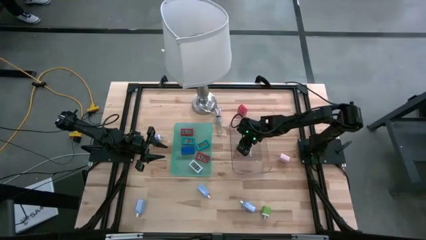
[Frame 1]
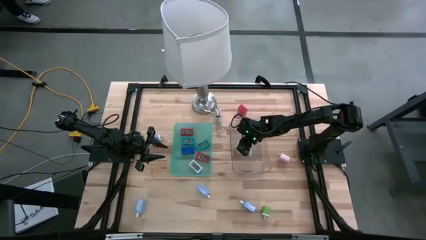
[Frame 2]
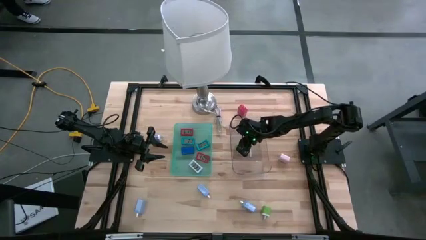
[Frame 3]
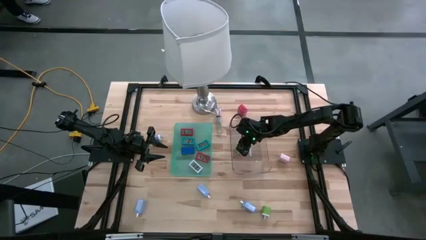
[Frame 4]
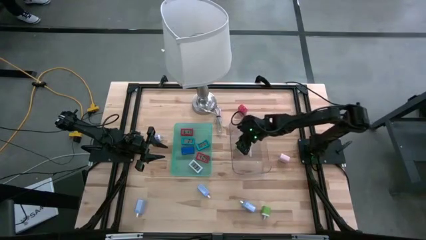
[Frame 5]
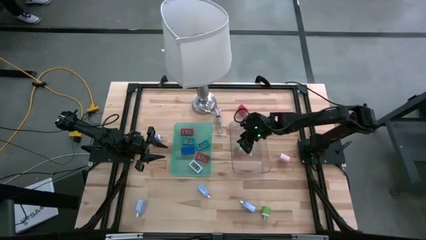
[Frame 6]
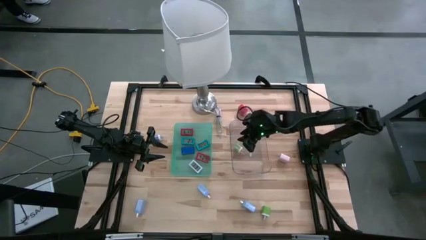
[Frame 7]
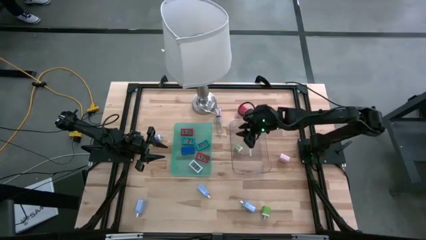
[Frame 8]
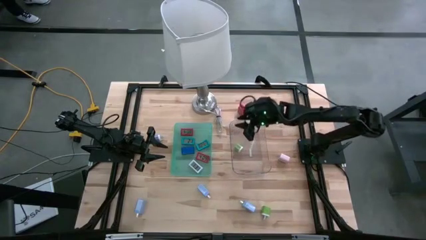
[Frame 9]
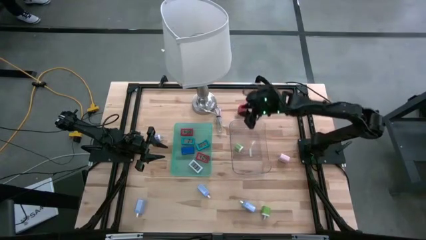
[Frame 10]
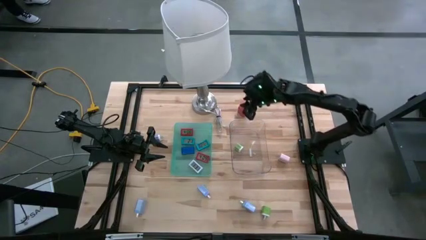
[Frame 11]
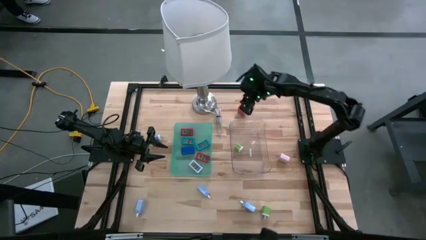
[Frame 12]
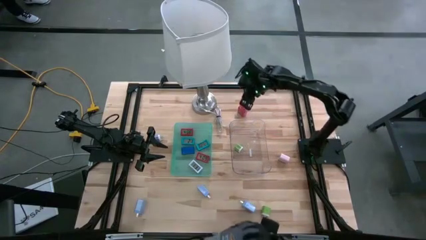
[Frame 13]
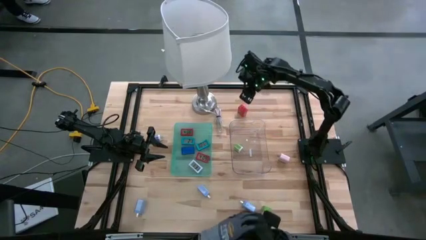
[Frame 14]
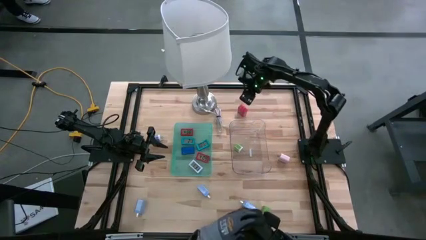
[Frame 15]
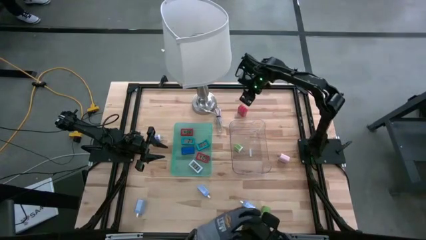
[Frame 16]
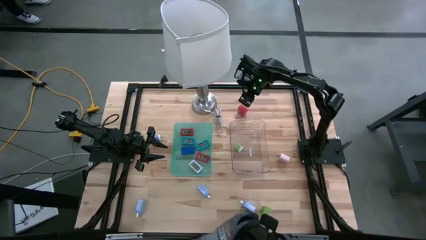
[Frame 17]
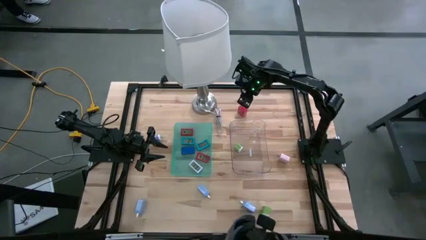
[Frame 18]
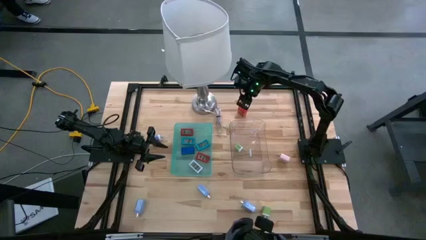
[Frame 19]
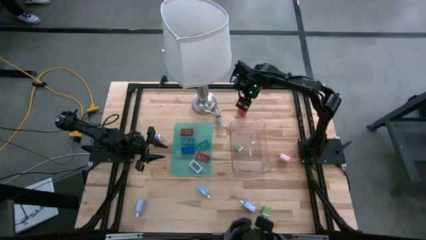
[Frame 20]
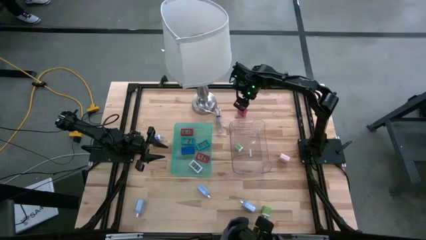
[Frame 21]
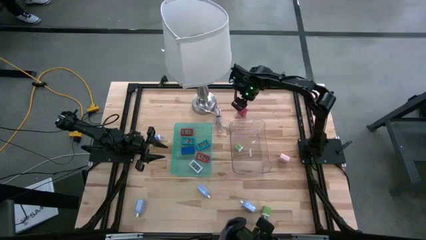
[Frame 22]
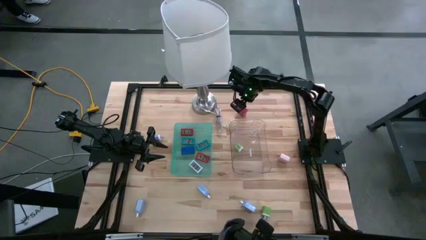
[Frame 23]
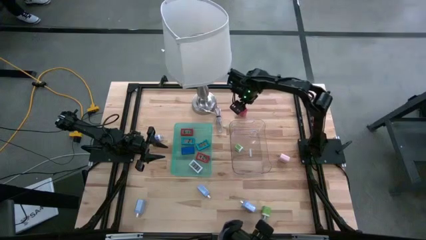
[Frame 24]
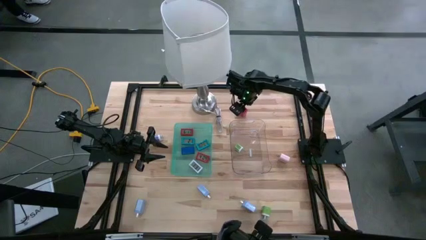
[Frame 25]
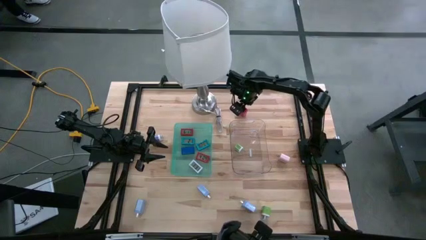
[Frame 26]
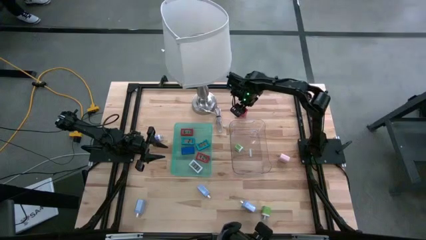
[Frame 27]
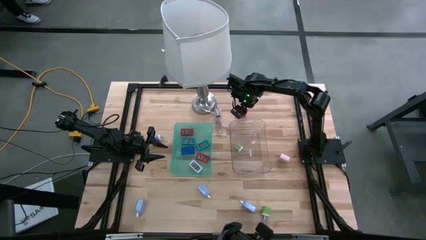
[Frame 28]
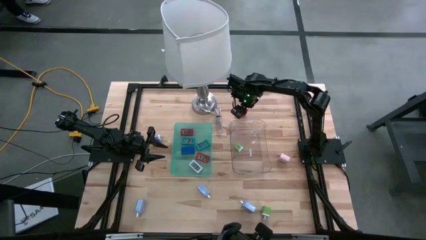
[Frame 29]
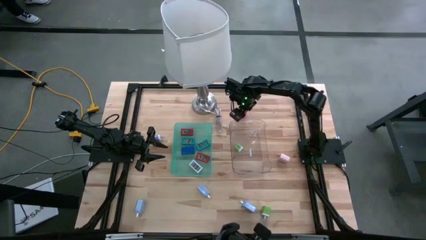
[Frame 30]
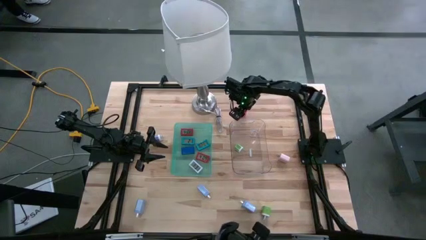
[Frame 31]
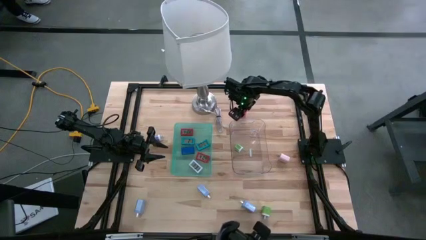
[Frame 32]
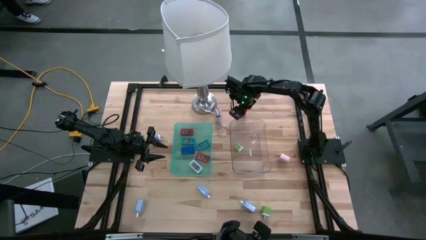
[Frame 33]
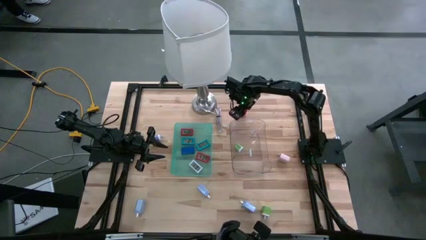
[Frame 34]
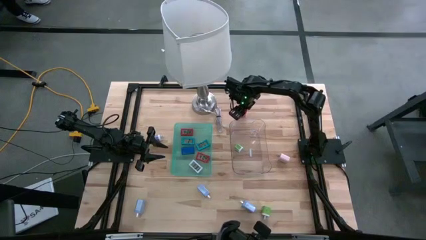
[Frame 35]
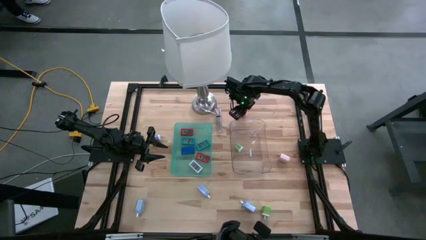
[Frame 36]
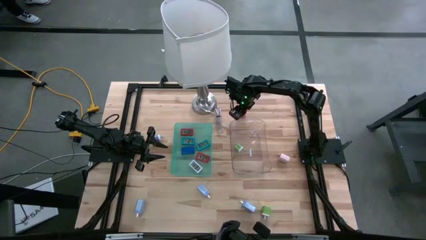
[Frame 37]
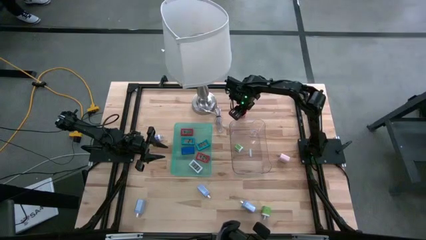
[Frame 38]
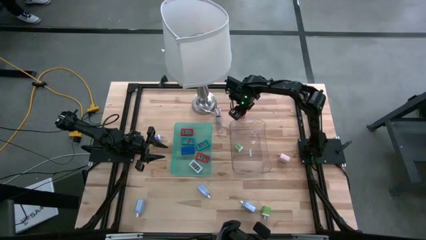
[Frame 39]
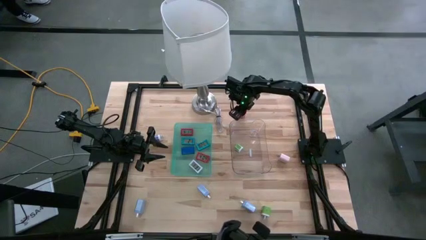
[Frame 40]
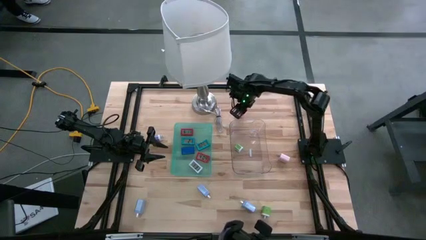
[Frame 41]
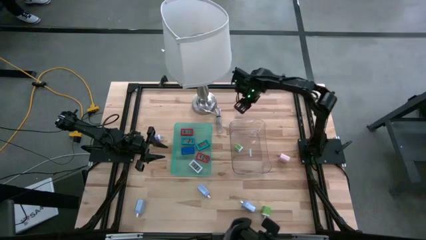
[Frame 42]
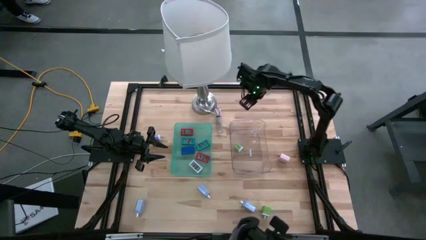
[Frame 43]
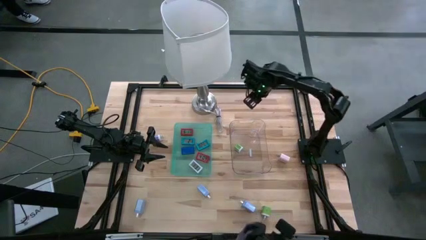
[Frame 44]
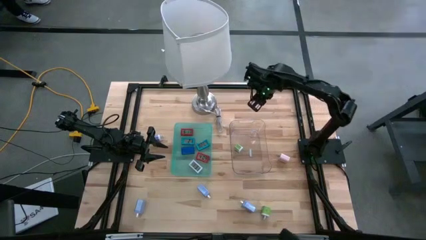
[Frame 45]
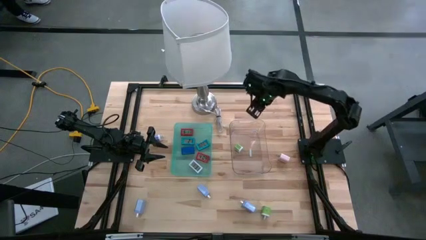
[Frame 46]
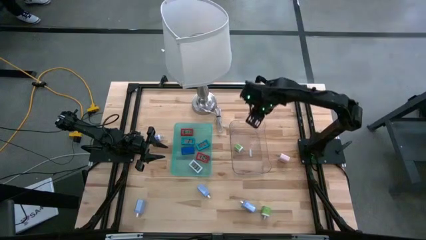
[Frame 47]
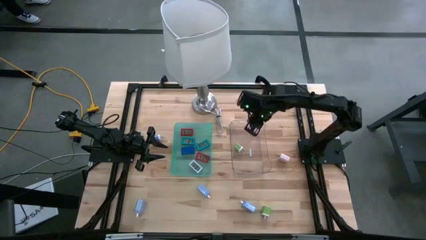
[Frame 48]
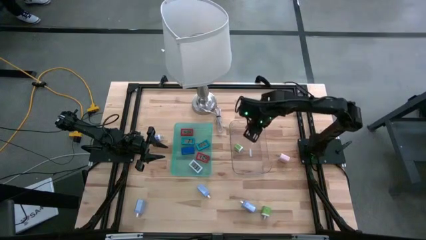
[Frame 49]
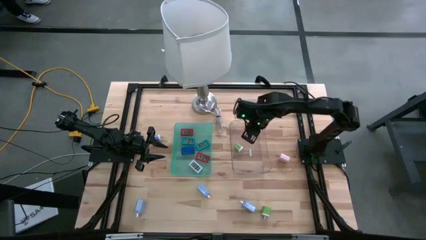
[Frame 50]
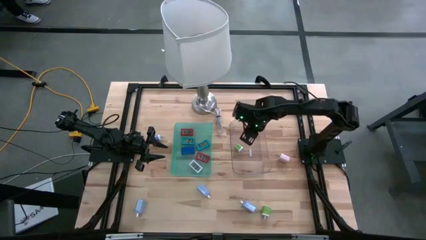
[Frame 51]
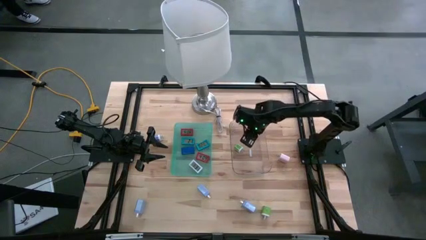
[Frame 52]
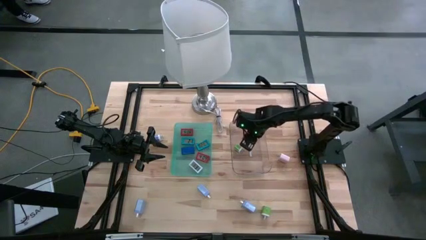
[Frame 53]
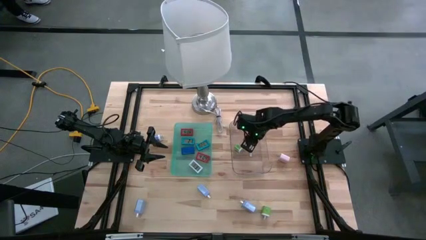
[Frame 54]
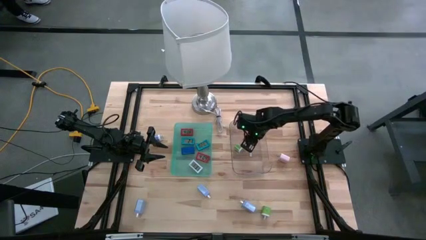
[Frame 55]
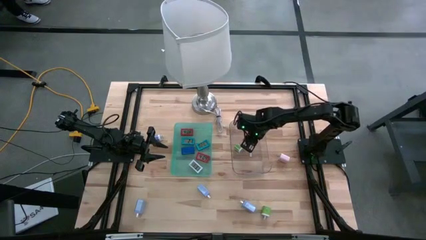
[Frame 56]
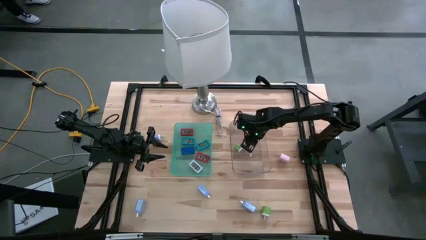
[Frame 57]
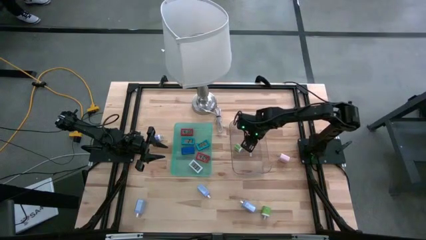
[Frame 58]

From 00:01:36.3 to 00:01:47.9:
Task: Pick & Place Office items
Put the red charger adapter into the transparent bin

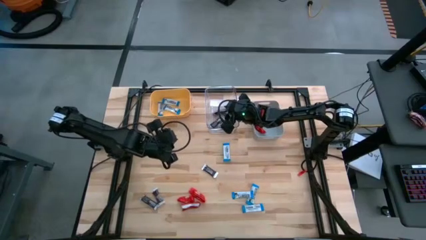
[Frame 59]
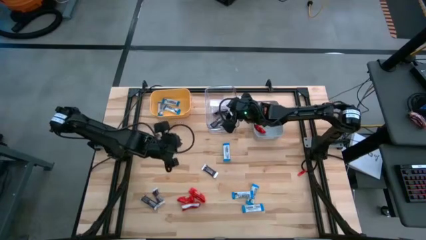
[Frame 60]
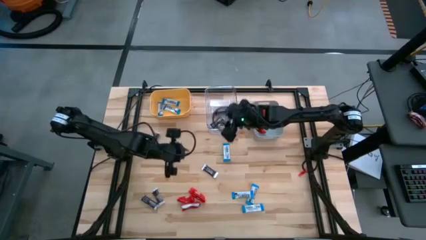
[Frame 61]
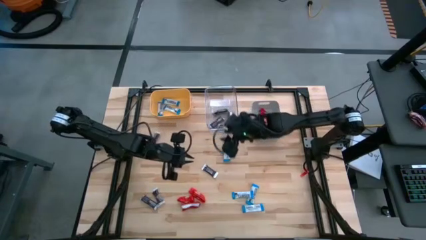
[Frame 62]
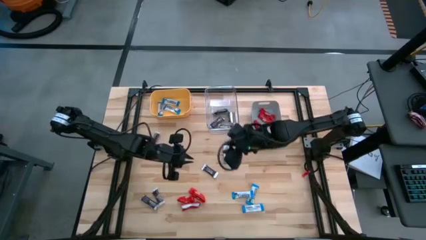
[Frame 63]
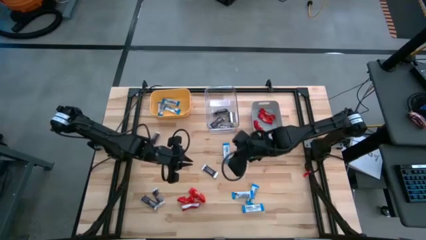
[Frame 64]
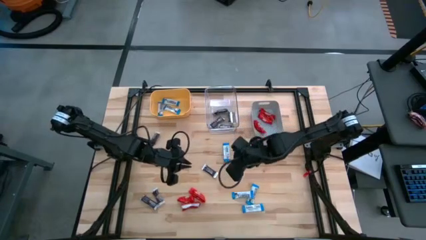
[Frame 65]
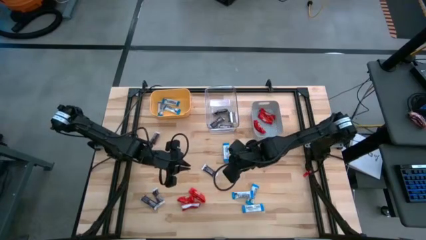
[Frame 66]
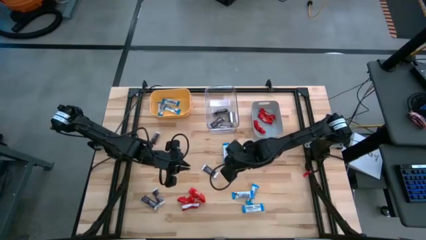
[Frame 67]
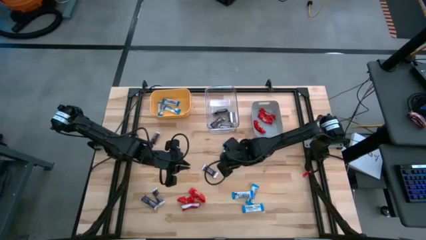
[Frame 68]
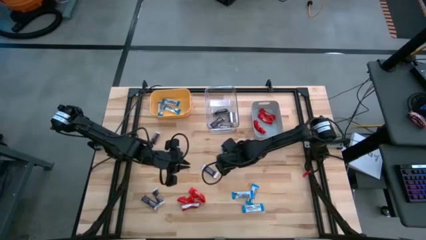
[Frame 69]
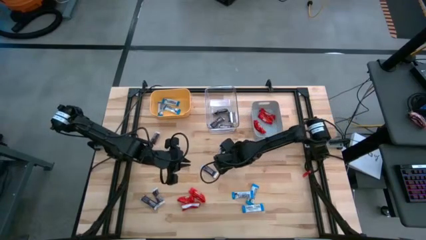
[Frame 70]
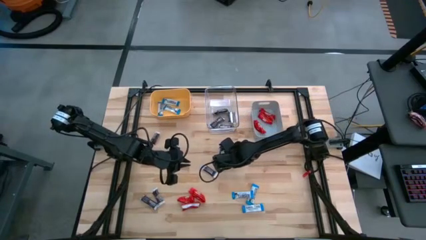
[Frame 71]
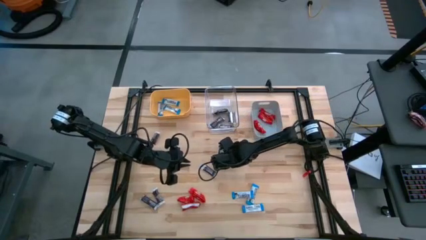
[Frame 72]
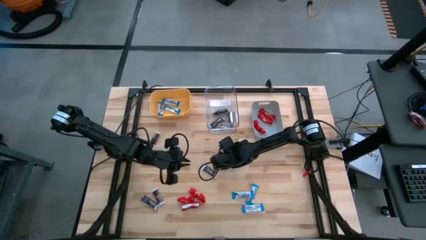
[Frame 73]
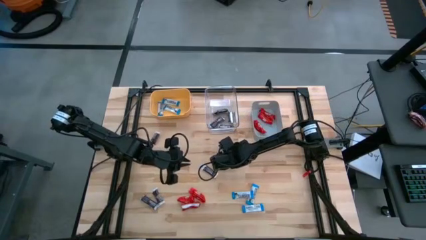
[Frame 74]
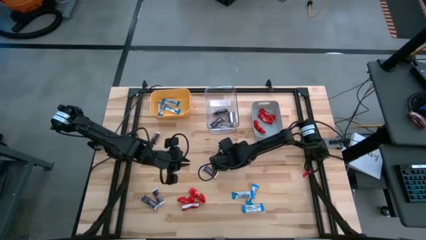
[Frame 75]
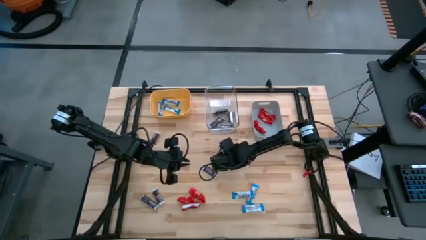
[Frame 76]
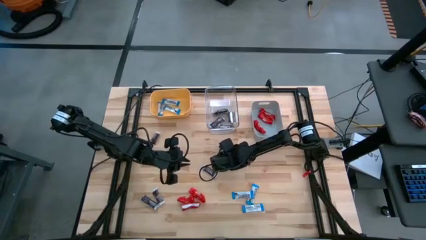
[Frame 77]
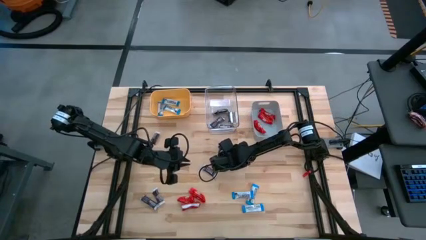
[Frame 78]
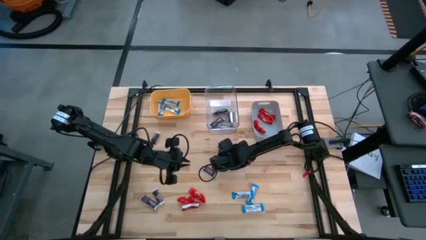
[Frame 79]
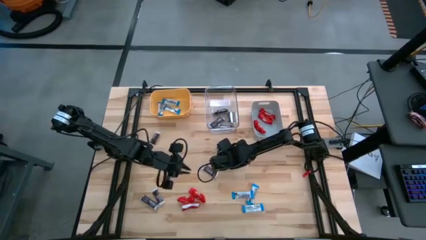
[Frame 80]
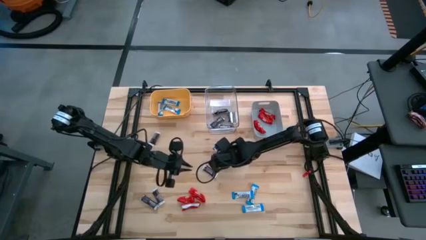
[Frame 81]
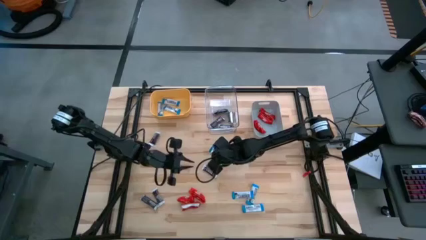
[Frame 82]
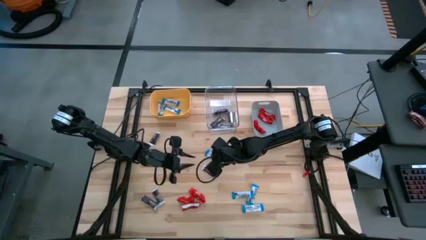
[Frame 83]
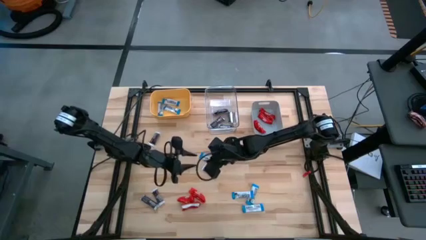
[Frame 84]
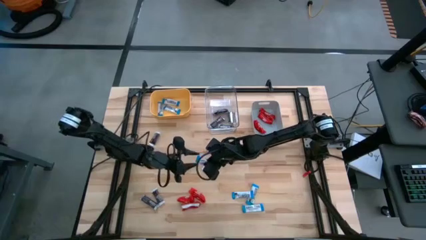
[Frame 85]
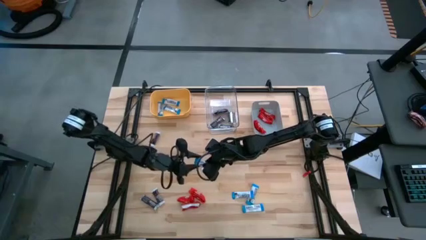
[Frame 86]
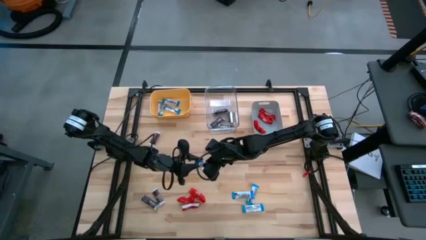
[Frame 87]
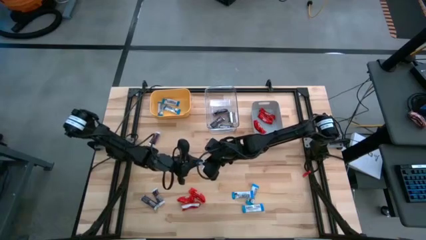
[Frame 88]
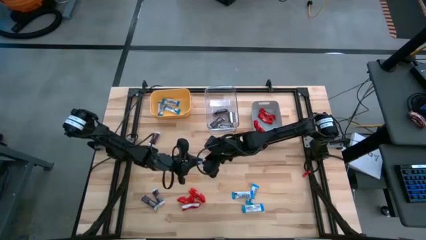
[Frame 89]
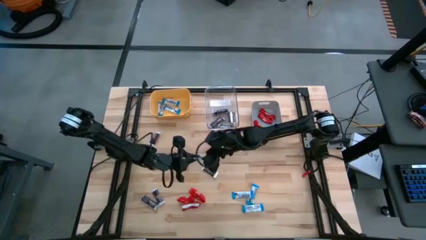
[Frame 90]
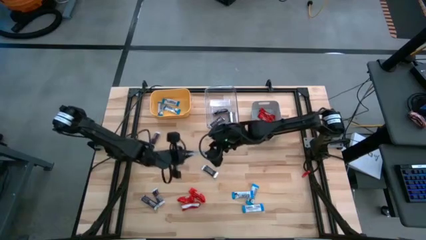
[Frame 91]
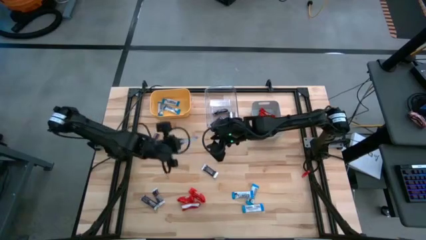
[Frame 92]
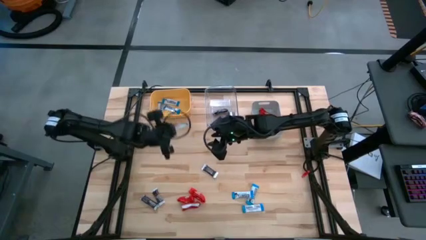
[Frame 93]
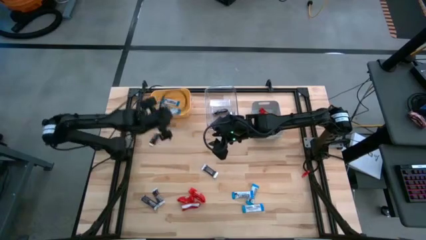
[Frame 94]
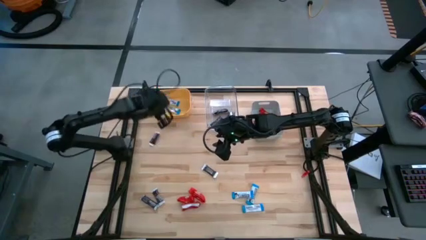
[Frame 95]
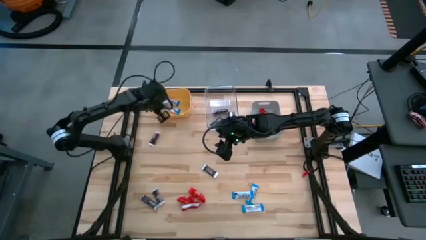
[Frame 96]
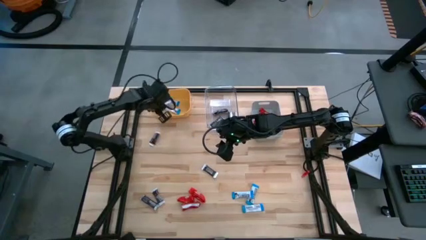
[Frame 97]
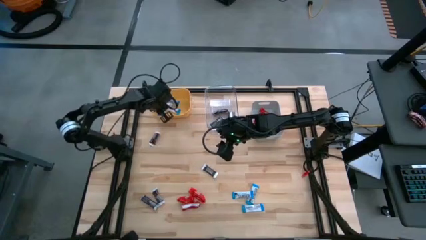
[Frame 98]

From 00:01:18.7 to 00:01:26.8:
Task: Sort candy
Put the white chocolate into the yellow bin
